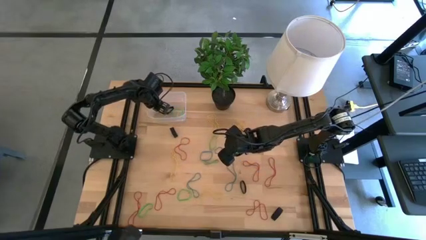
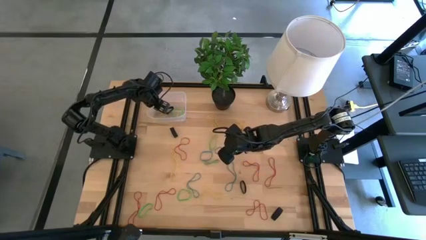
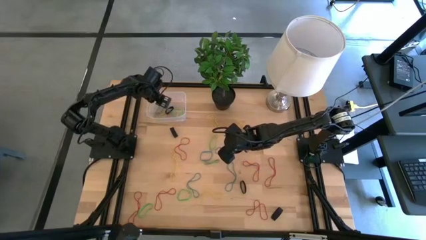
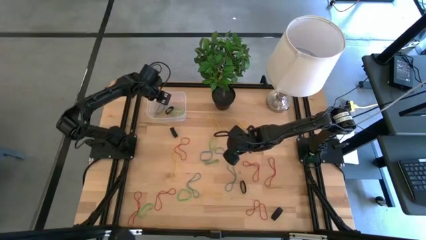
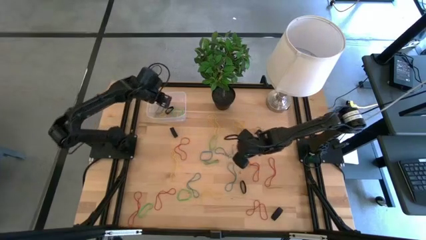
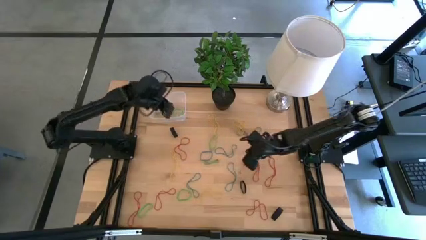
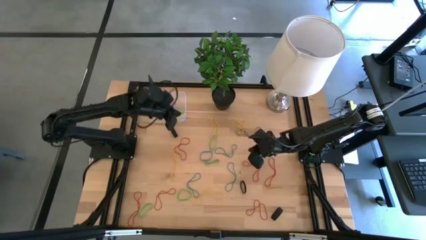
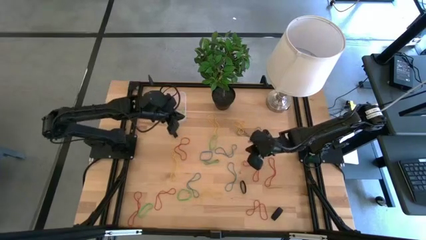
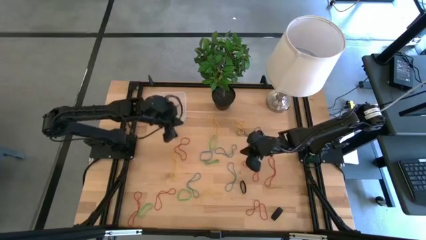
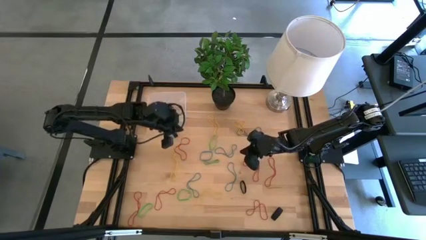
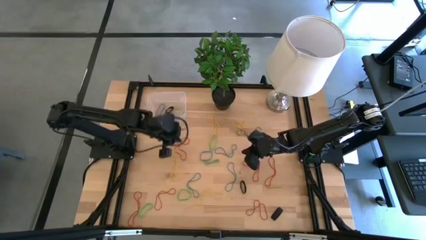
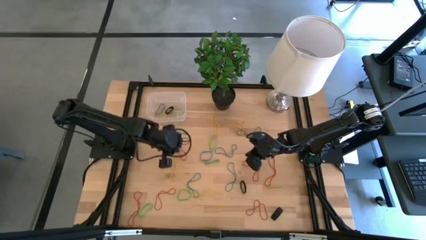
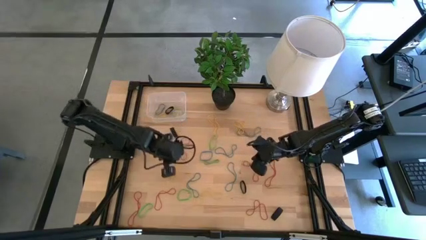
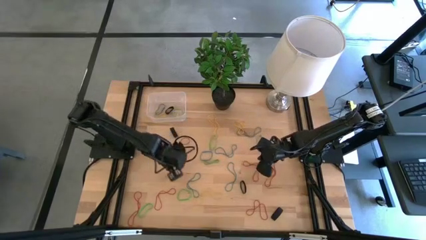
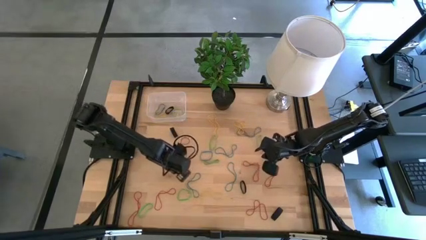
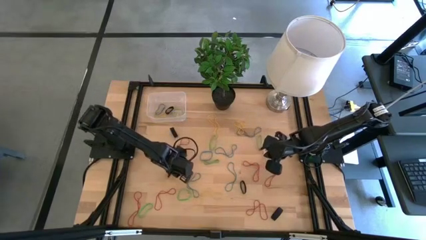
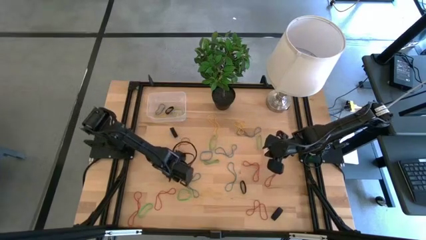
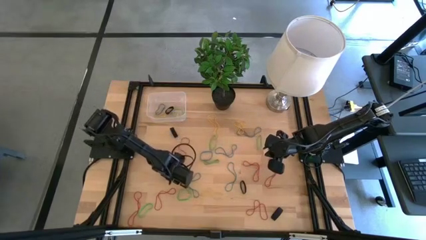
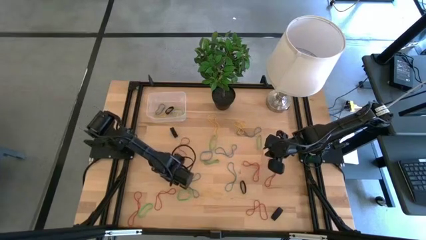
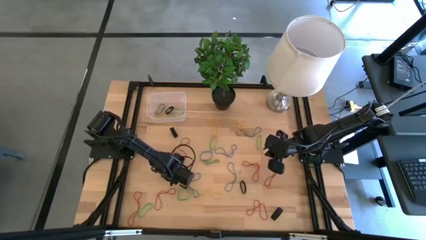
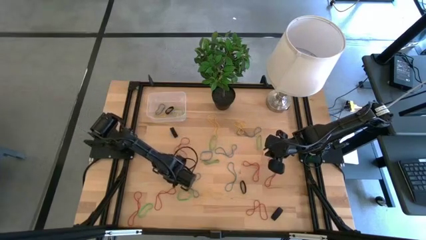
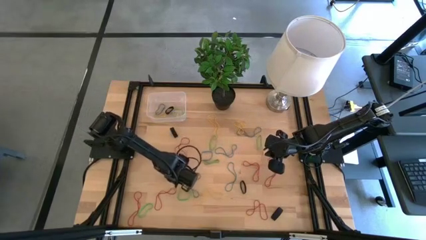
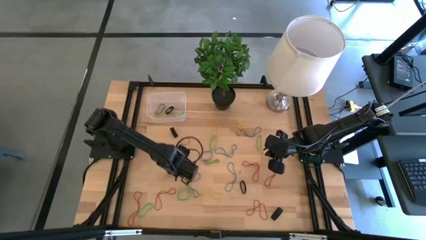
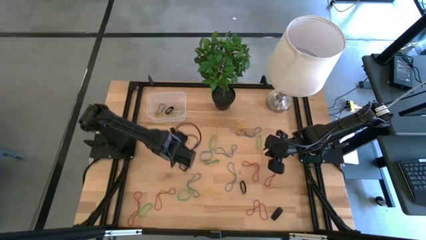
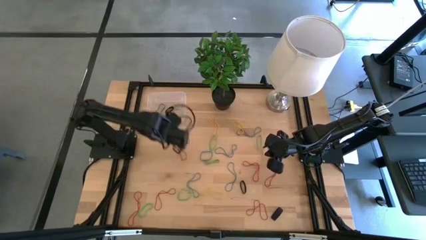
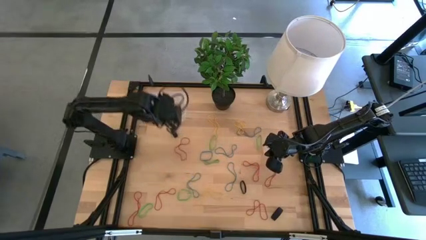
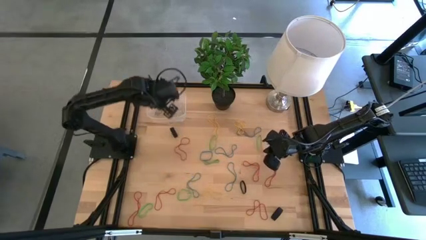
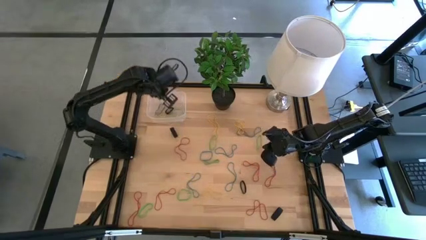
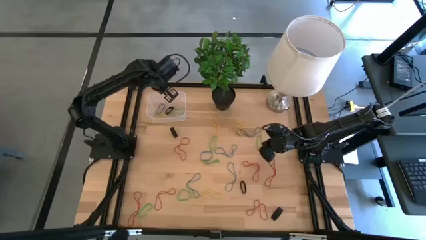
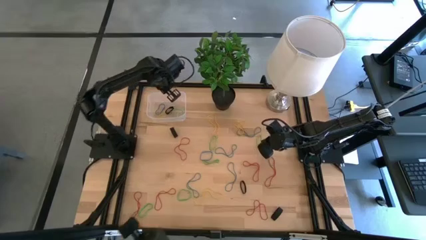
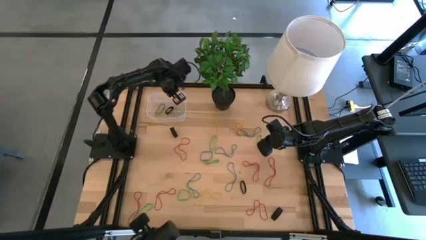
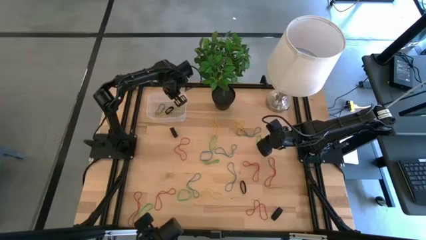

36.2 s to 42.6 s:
Task: Pick and place rubber bands into bin
Put the yellow rubber band into the transparent bin

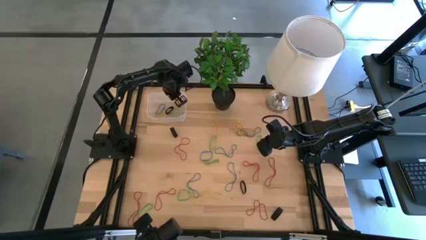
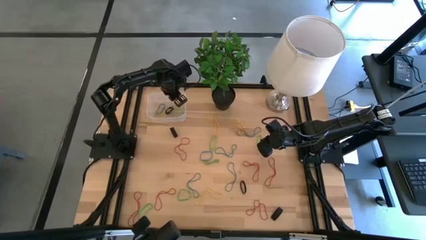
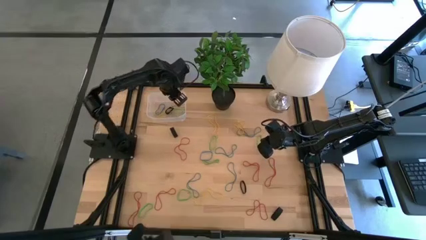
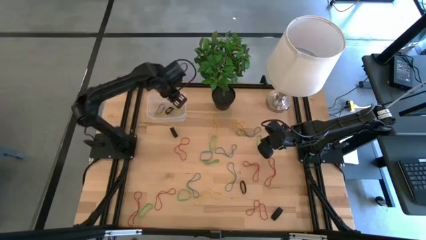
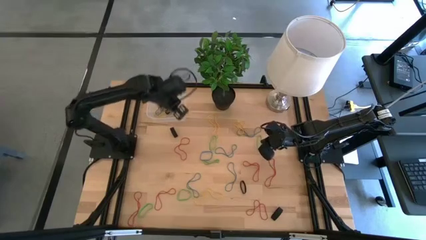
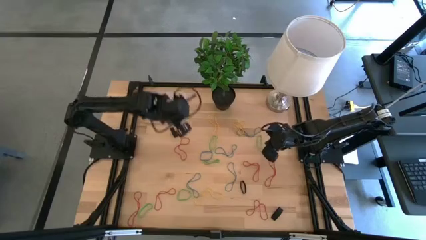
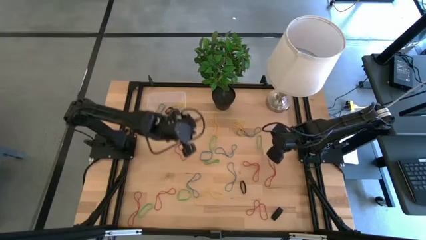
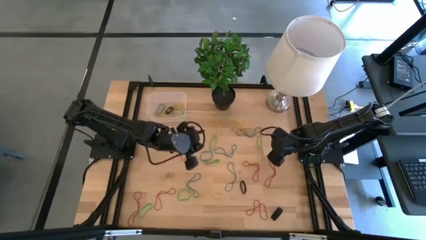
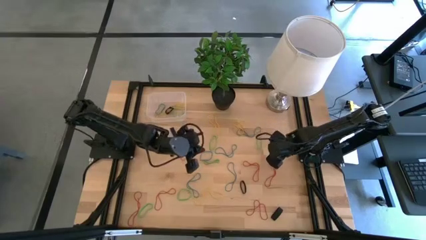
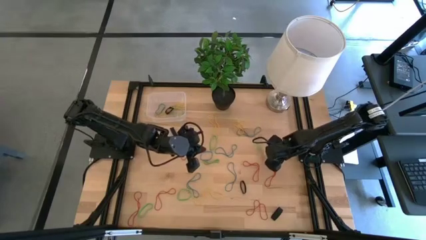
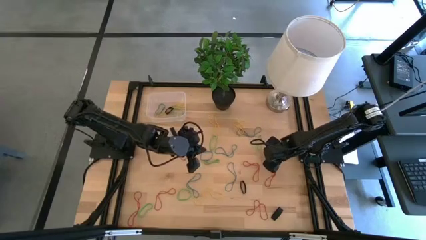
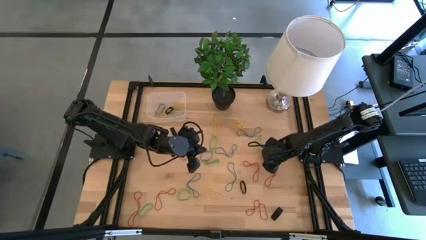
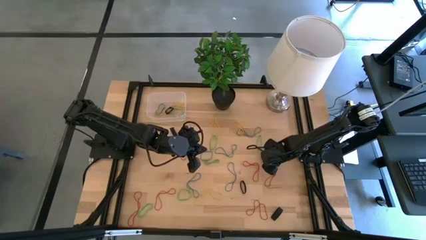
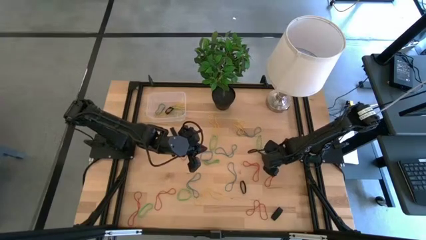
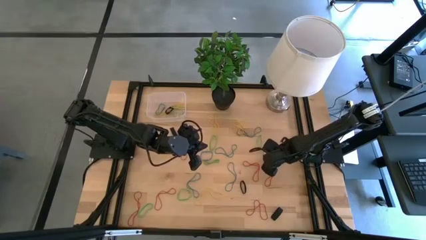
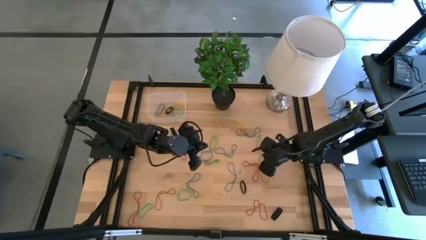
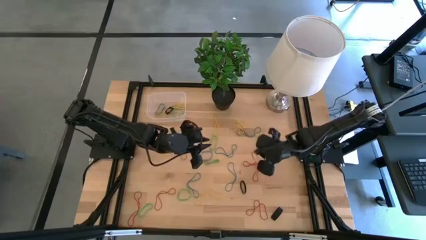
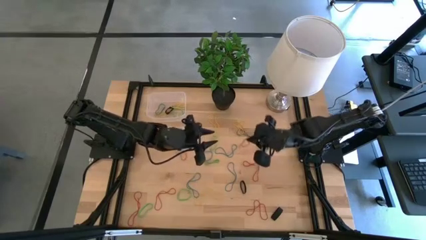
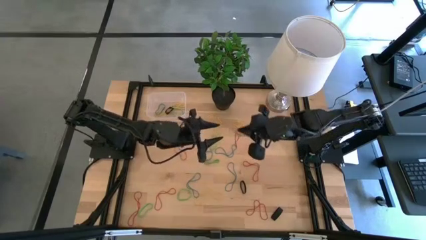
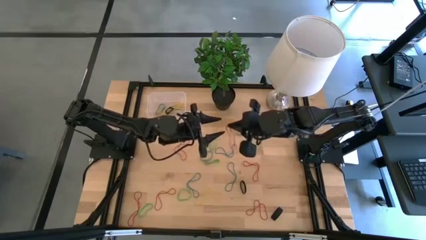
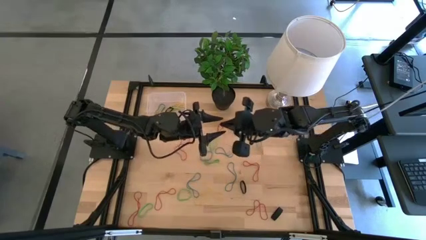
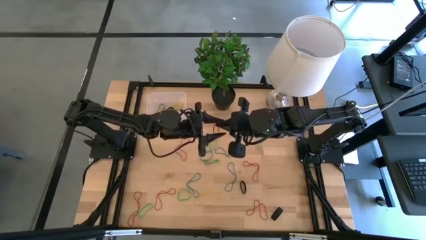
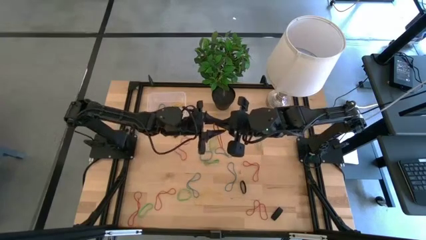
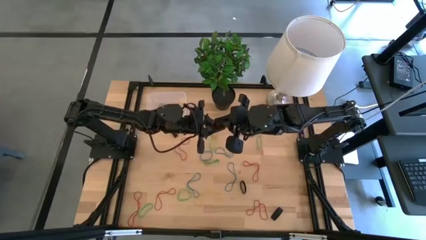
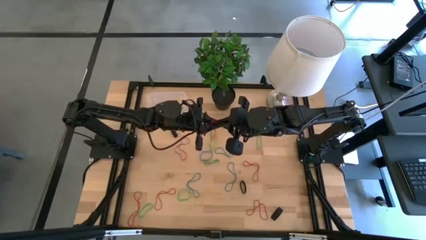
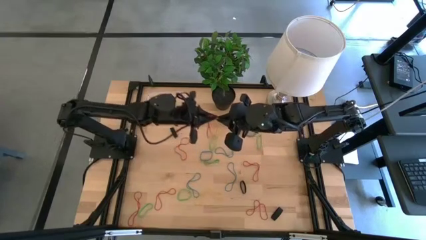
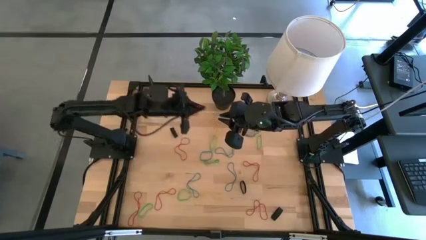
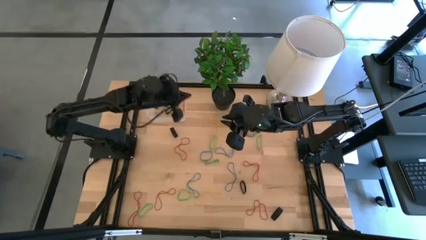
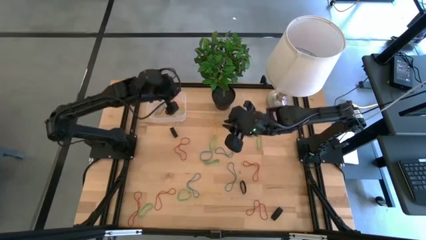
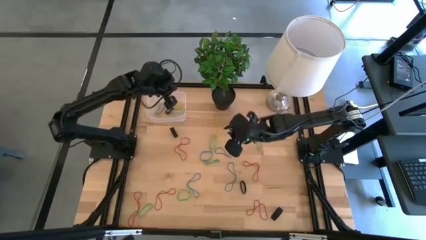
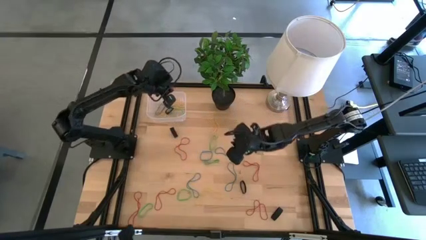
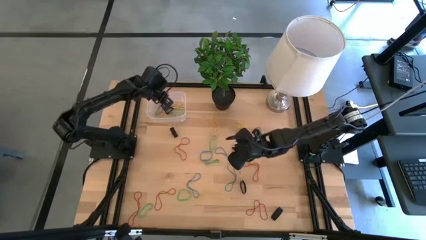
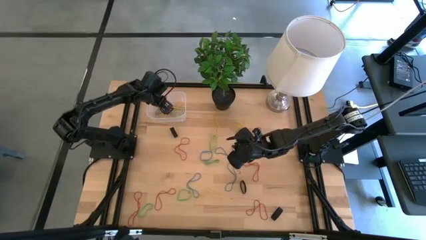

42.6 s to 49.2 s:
Put the red rubber band into the transparent bin

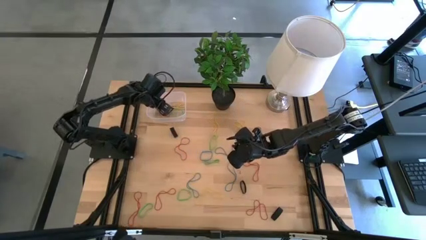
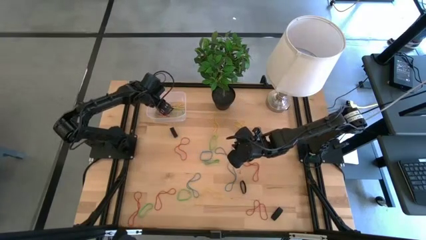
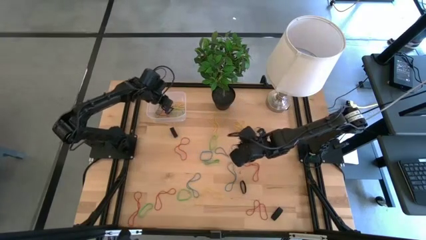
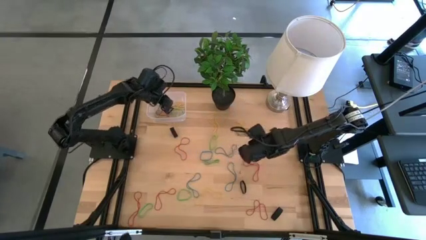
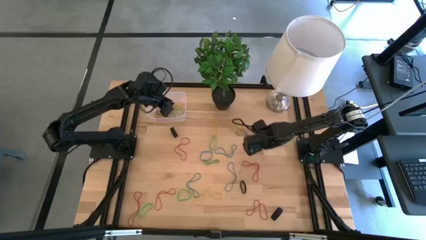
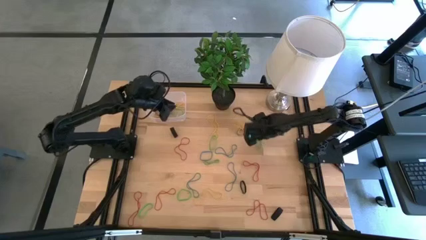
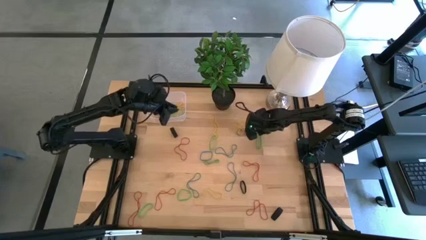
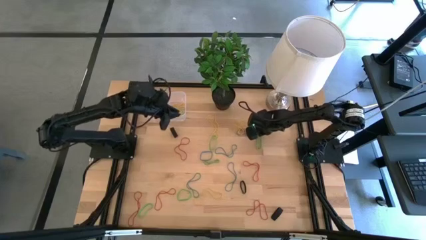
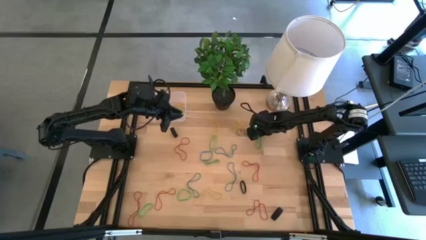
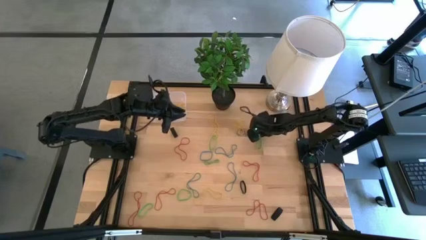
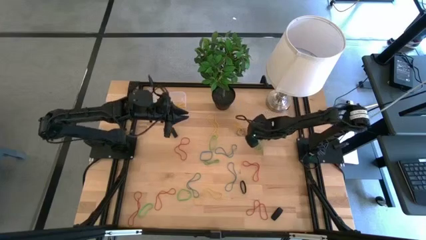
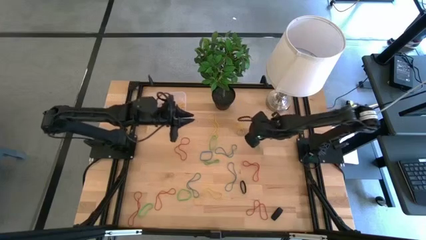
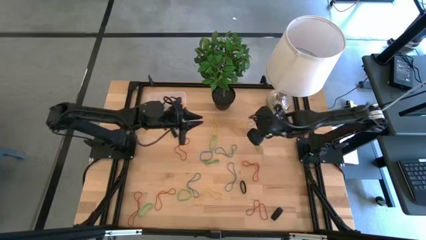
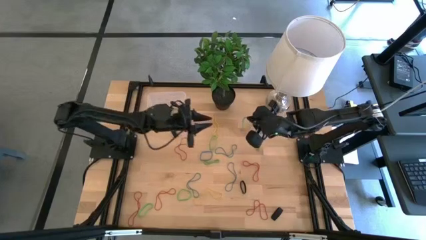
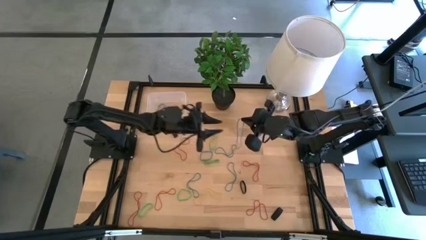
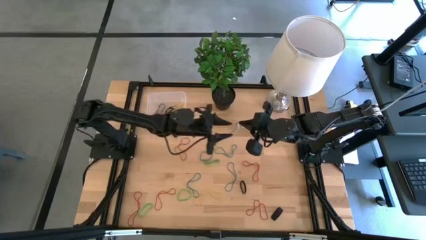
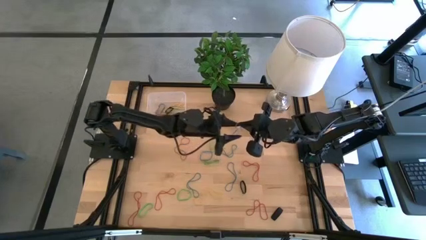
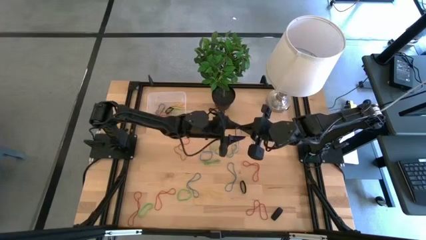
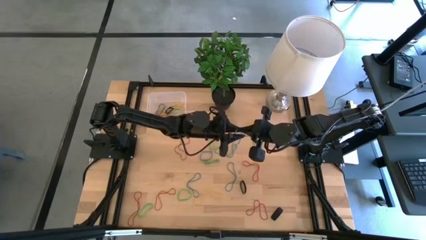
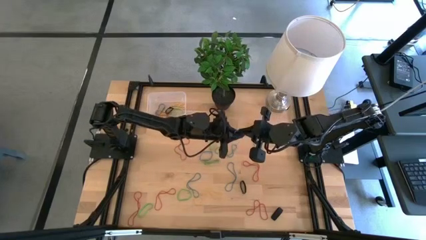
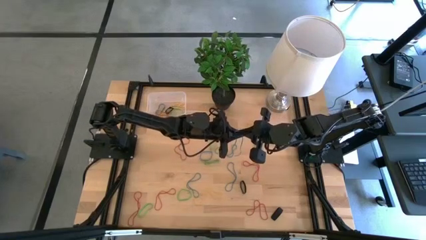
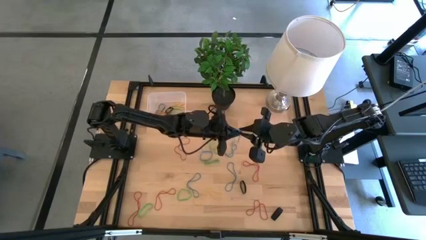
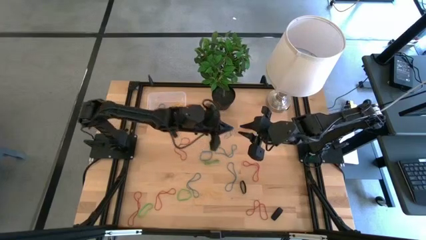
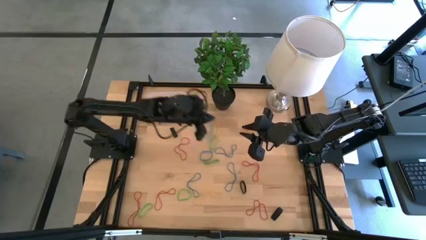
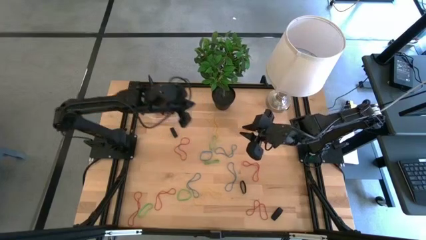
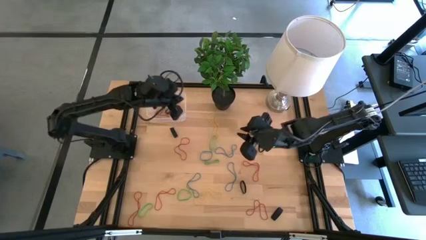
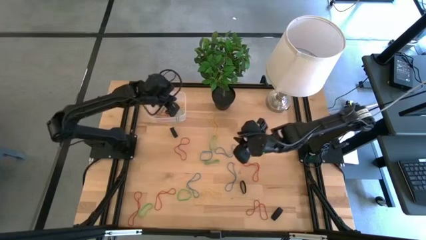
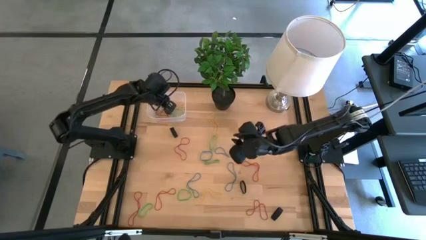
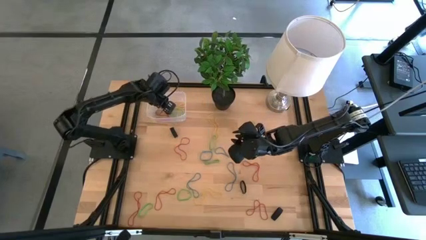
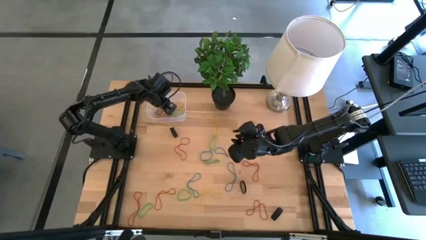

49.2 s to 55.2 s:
Put the blue rubber band into the transparent bin
